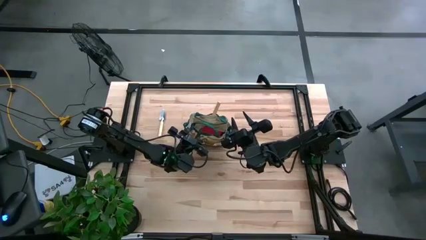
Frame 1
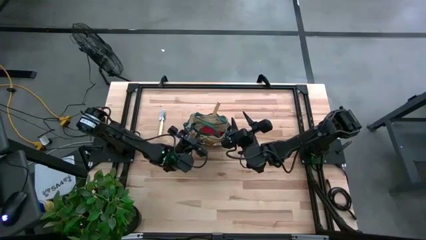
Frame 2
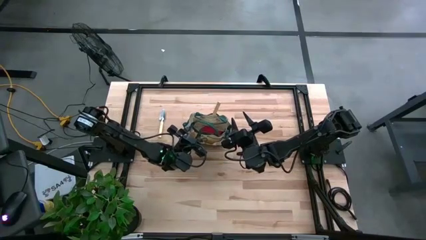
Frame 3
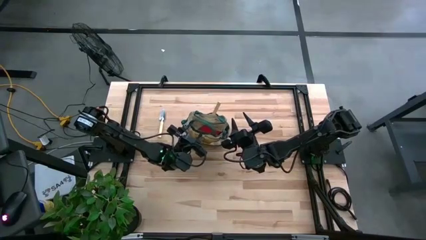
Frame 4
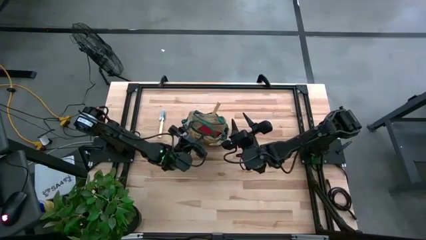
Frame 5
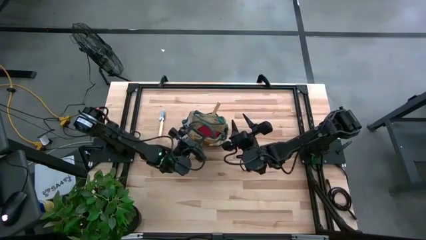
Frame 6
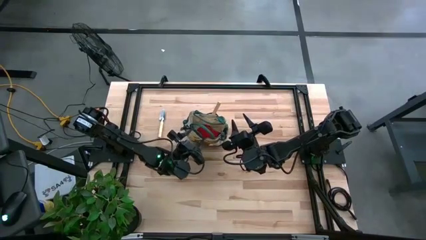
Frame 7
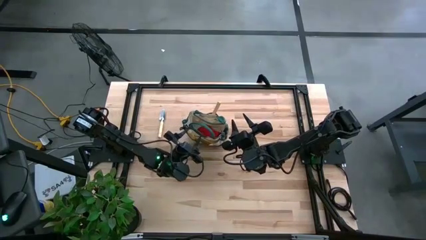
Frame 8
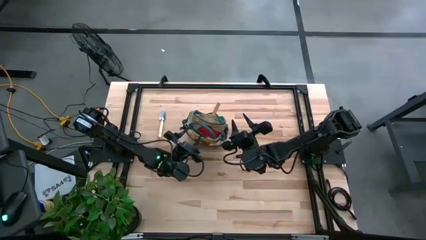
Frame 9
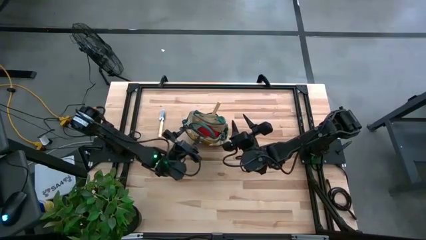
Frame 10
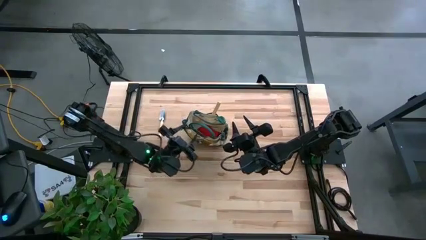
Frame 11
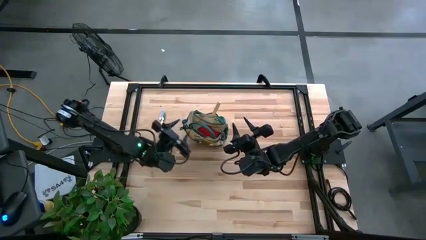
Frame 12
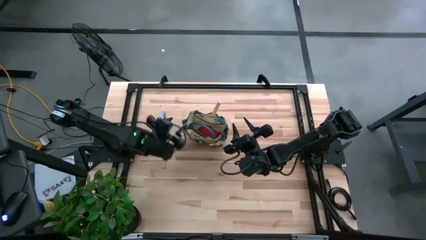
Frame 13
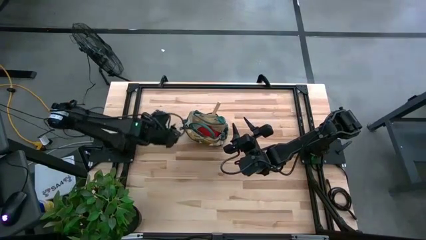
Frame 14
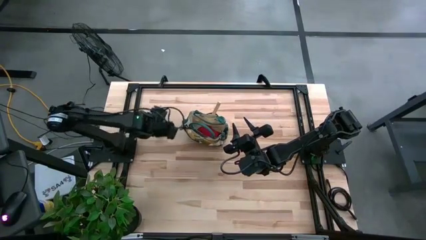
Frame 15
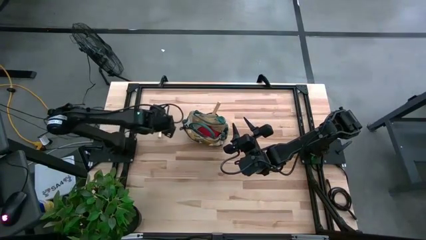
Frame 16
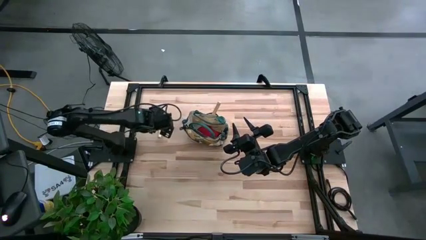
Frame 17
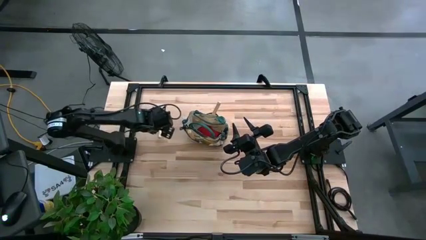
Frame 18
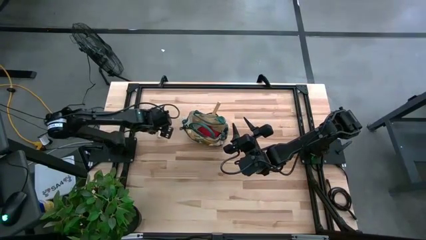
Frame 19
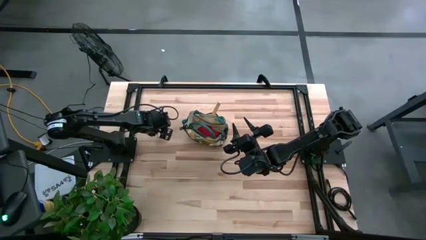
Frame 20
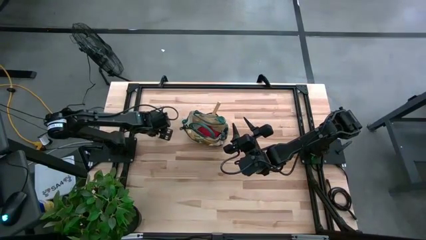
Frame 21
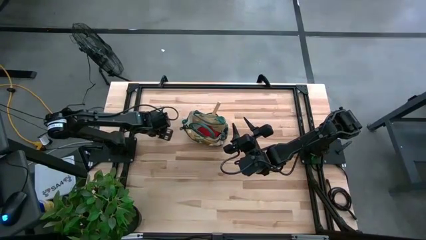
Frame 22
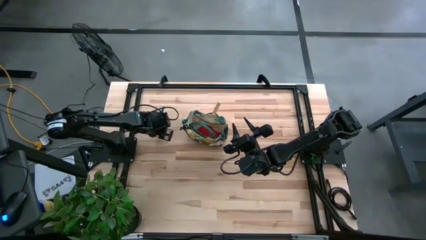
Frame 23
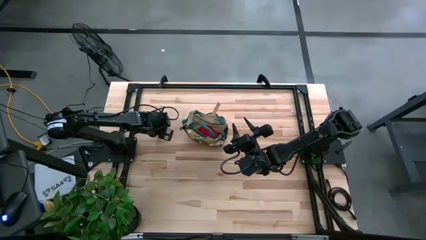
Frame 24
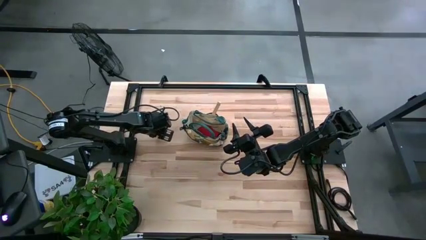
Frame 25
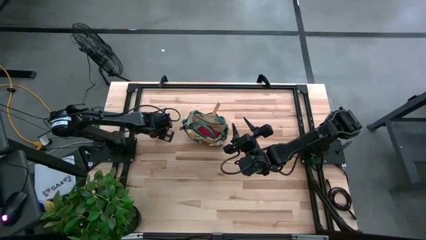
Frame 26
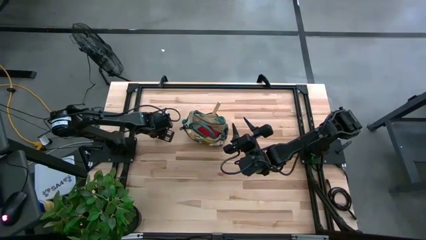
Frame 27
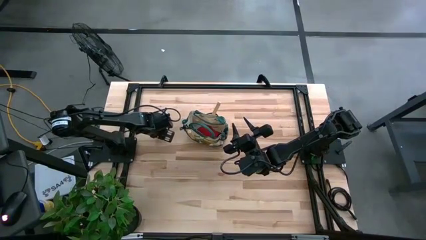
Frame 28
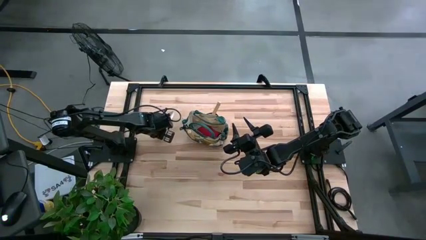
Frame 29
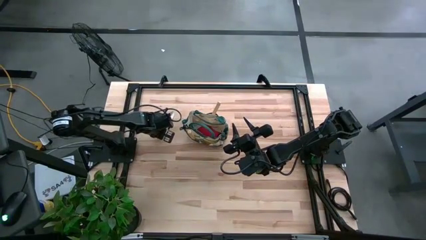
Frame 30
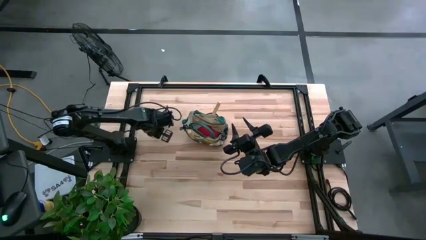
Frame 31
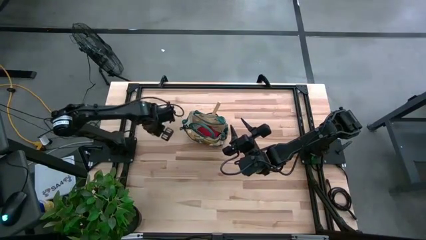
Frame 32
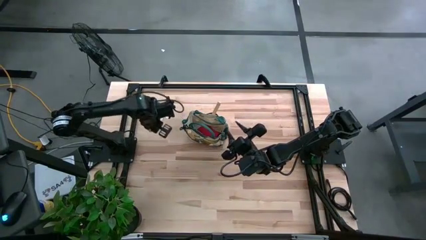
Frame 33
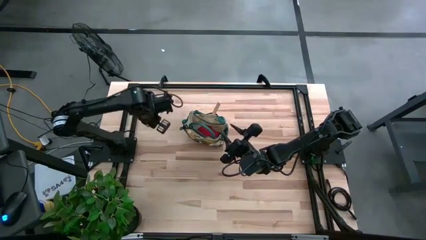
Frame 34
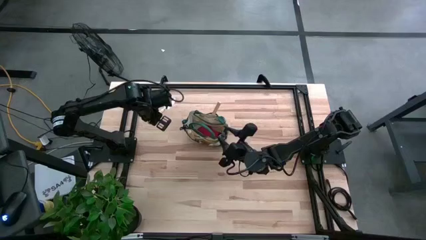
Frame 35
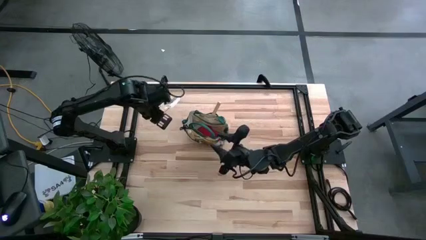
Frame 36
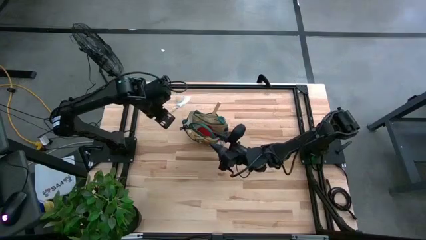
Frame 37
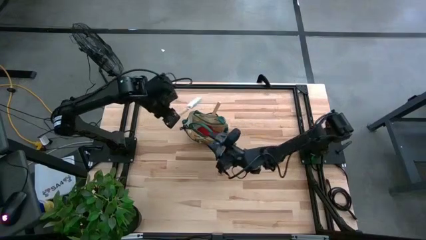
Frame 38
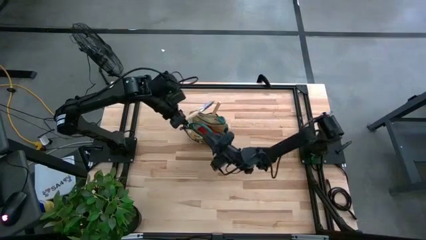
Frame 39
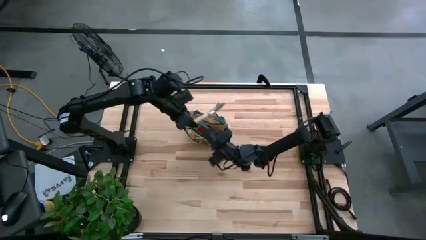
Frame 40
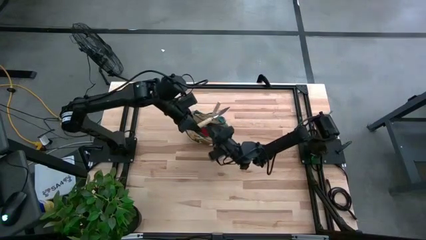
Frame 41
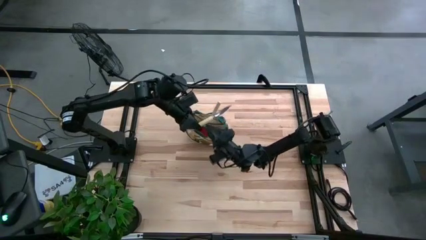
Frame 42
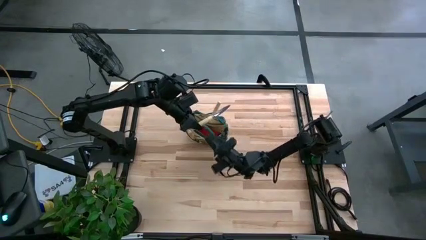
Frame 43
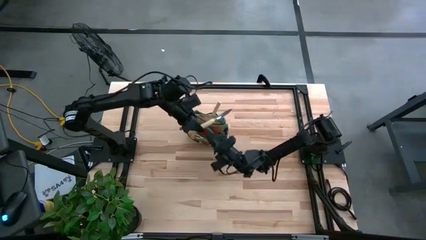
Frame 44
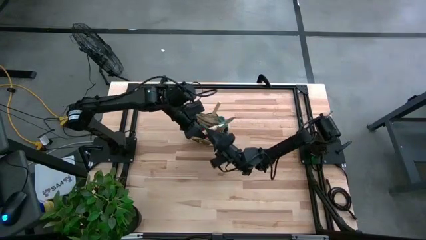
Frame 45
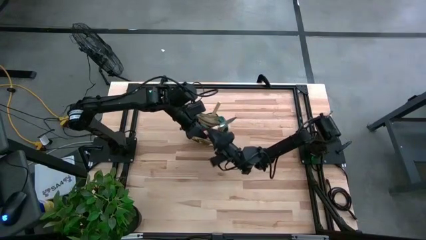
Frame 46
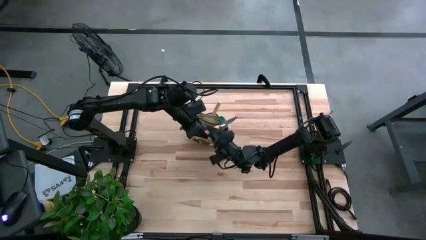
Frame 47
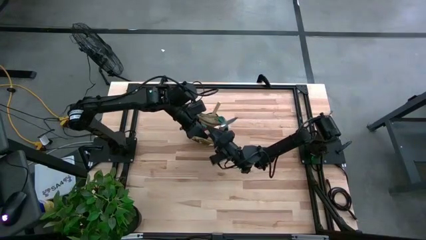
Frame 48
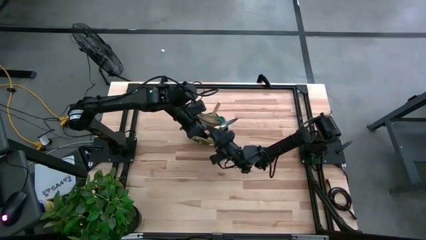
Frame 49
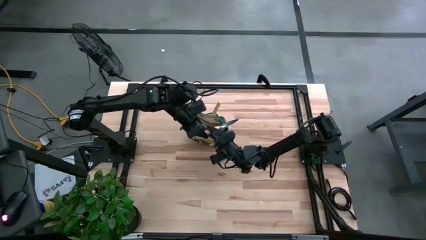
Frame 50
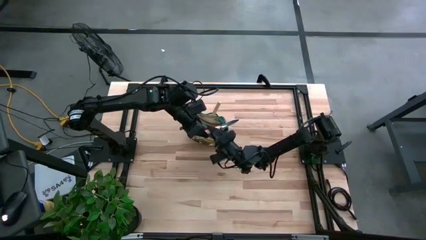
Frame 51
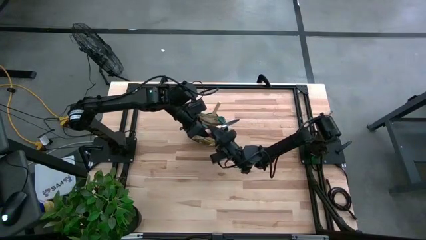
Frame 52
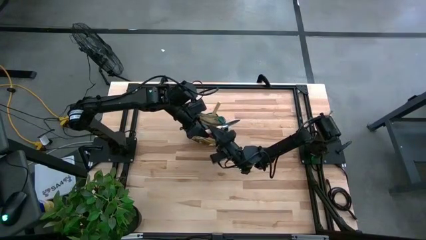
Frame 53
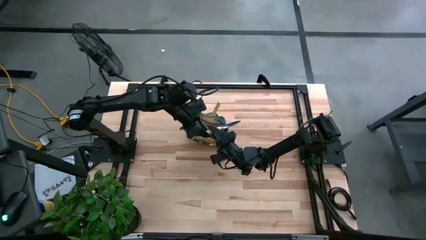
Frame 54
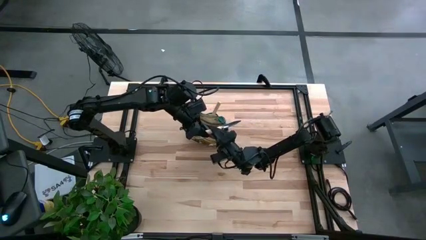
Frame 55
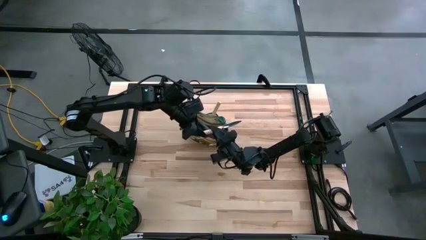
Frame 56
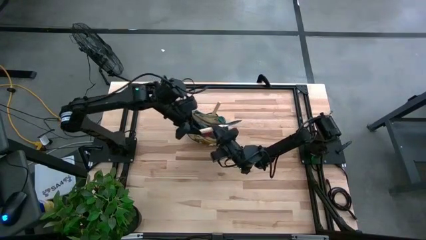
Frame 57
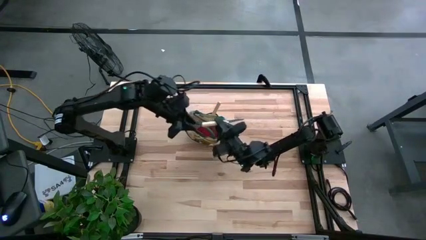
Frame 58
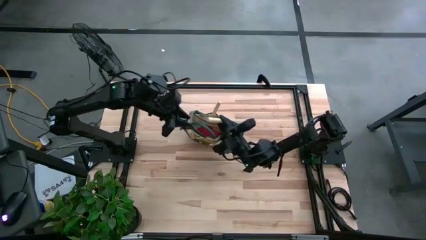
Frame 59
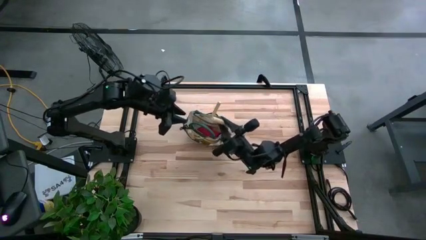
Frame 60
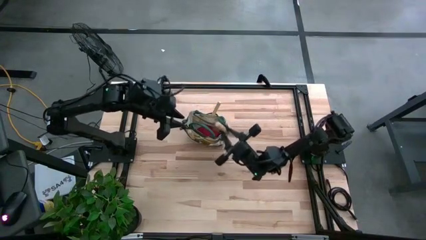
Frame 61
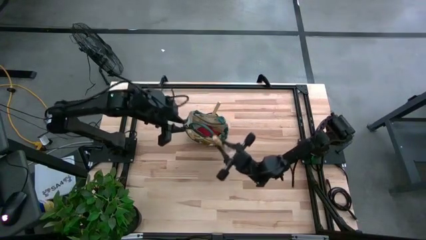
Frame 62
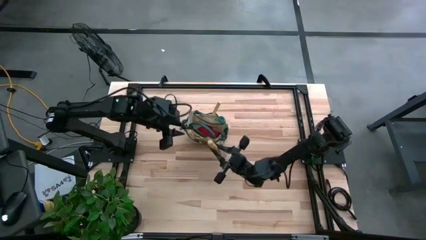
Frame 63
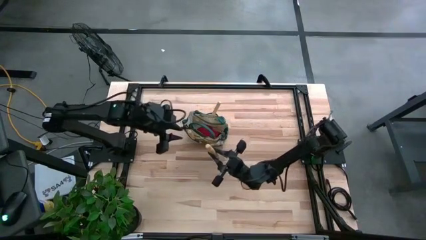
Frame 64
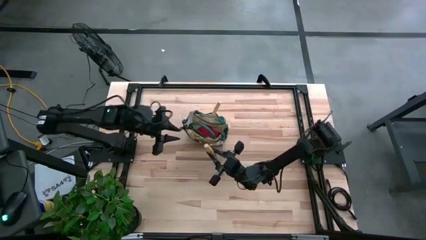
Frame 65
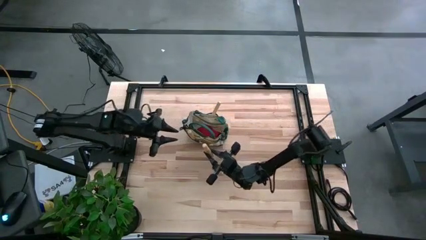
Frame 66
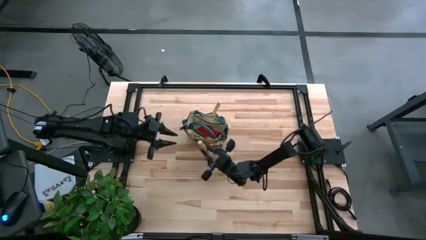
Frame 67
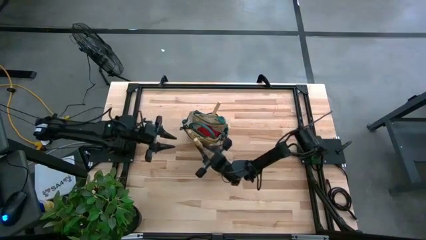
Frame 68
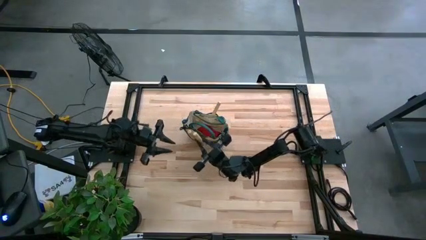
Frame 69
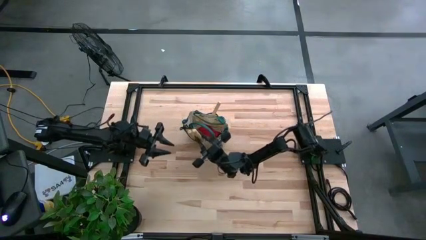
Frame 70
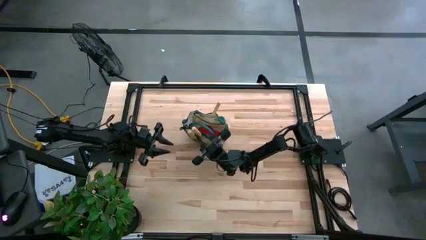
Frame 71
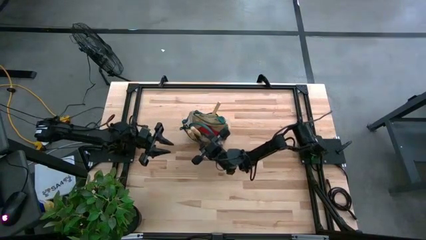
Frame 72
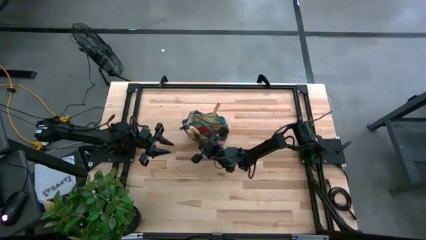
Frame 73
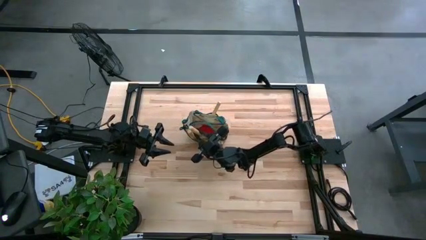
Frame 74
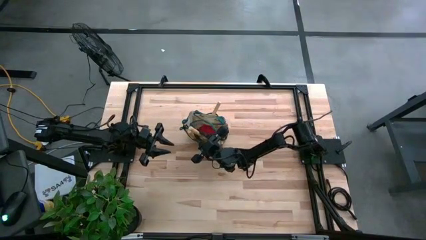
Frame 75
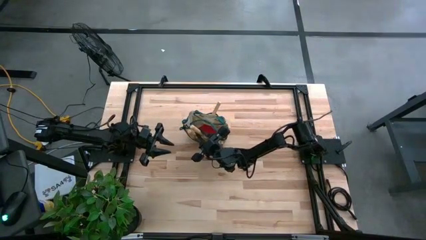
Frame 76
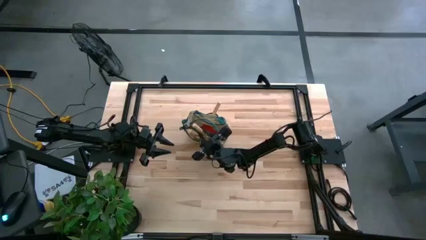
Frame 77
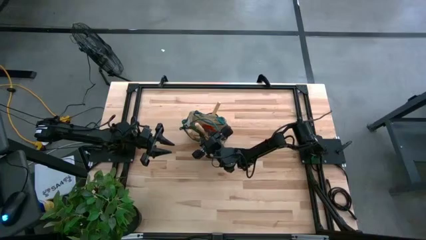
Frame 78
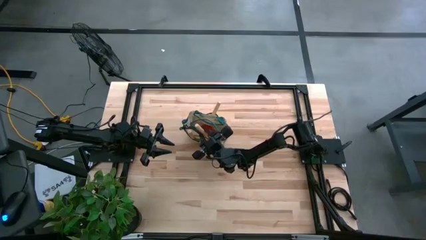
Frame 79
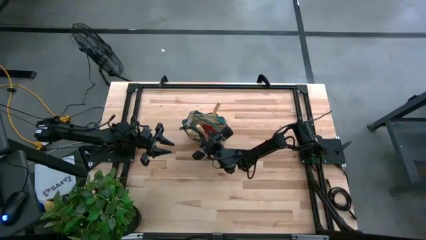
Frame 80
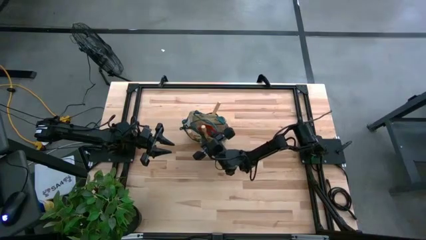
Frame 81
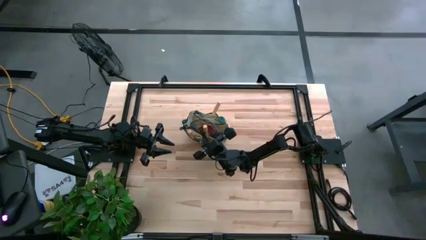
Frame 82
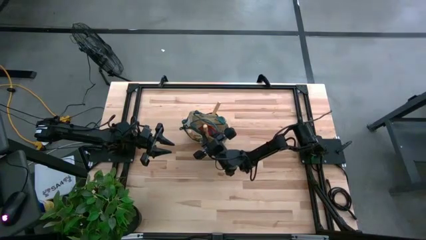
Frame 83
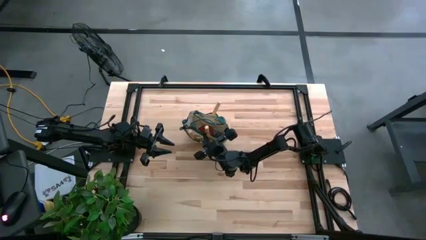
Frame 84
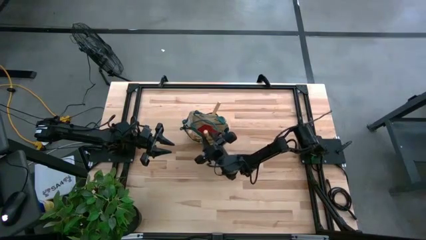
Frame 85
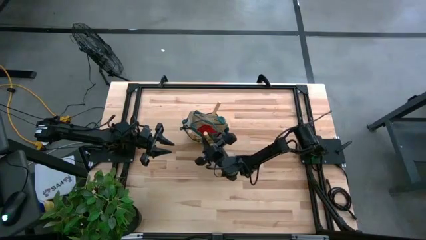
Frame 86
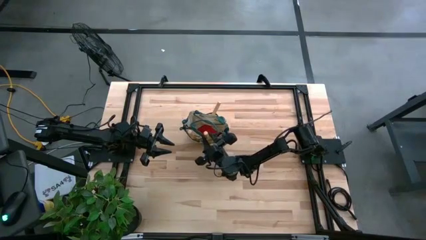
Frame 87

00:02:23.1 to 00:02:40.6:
Task: Pick & Place Garden tools in Gardening bag
Put the light brown trowel into the light brown gardening bag
